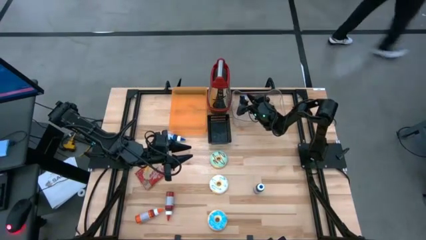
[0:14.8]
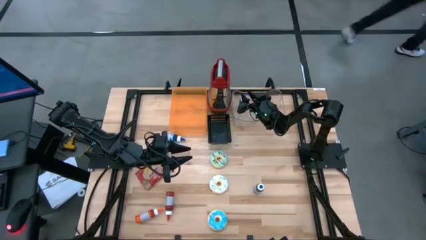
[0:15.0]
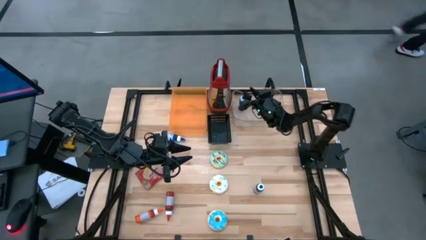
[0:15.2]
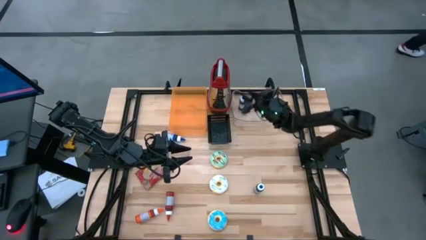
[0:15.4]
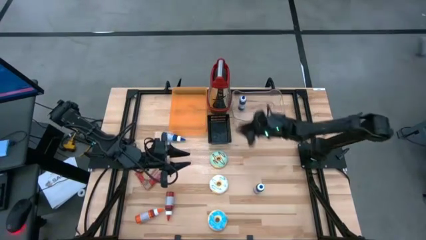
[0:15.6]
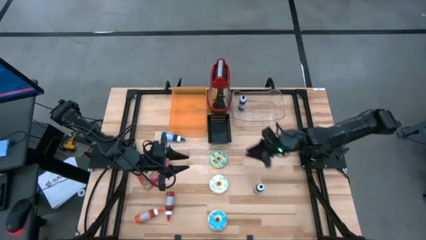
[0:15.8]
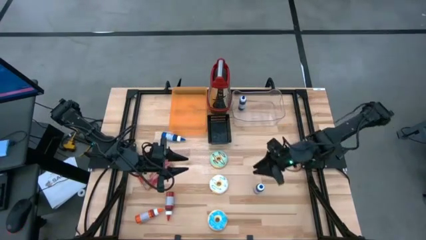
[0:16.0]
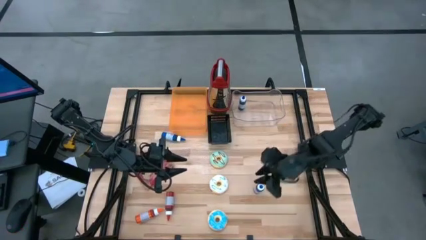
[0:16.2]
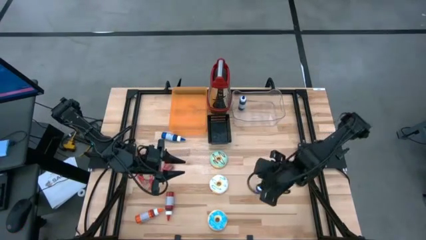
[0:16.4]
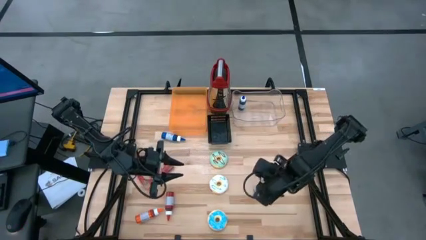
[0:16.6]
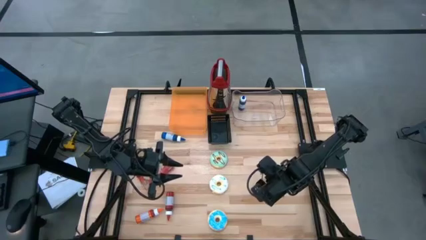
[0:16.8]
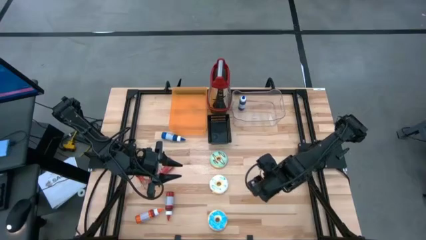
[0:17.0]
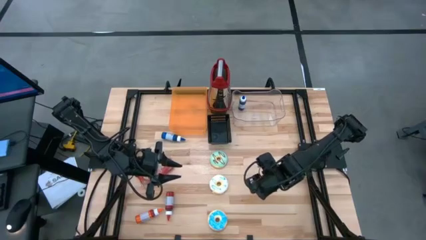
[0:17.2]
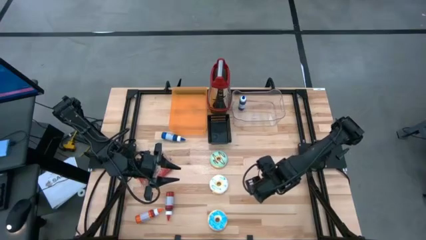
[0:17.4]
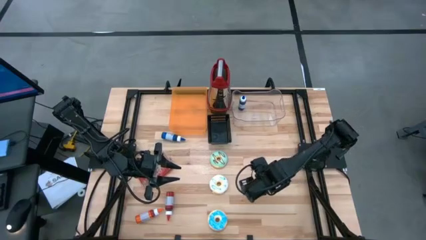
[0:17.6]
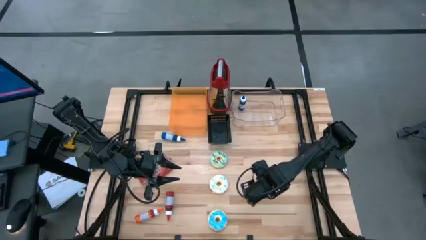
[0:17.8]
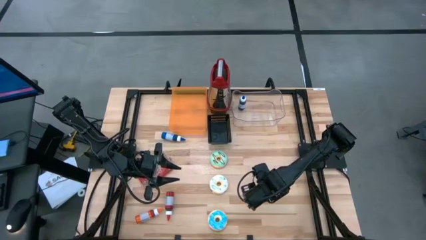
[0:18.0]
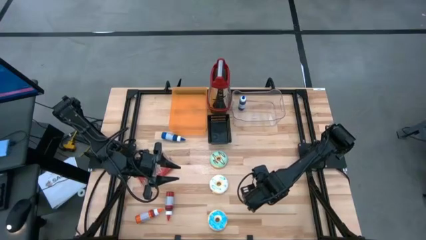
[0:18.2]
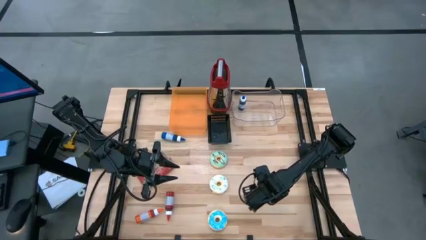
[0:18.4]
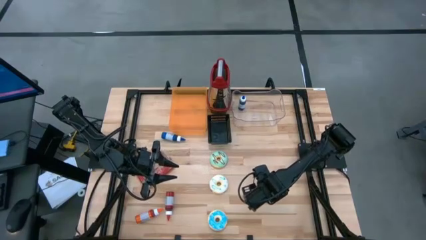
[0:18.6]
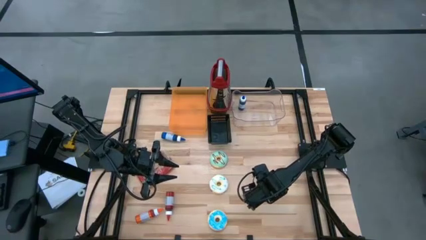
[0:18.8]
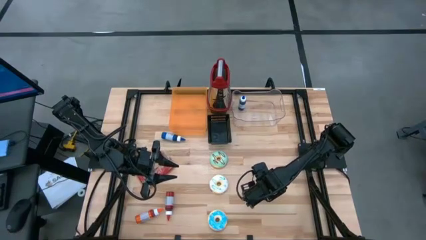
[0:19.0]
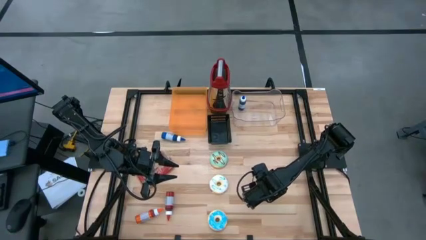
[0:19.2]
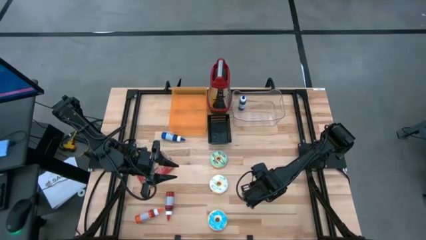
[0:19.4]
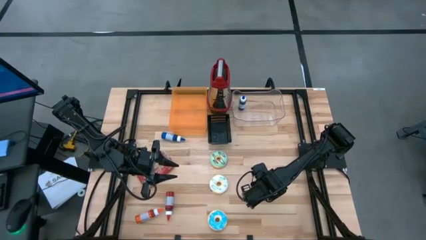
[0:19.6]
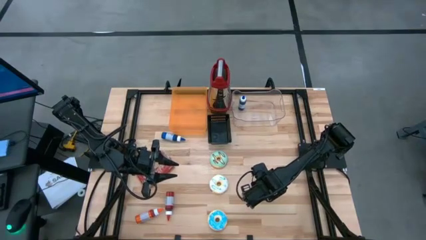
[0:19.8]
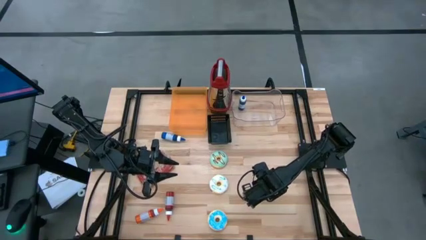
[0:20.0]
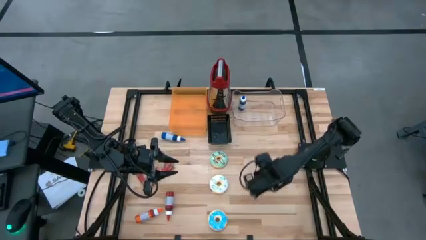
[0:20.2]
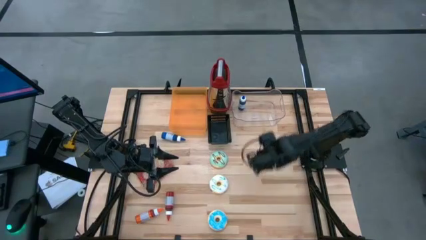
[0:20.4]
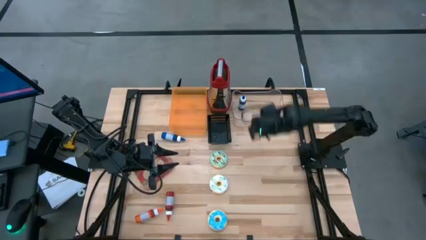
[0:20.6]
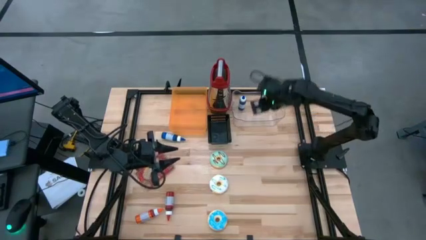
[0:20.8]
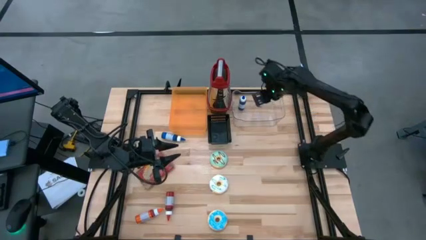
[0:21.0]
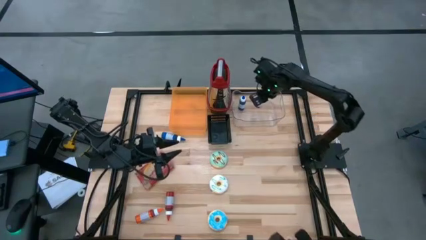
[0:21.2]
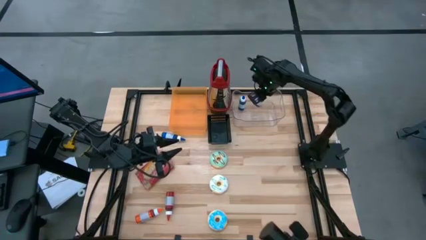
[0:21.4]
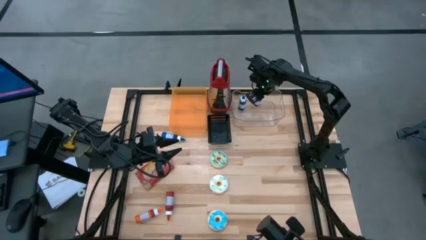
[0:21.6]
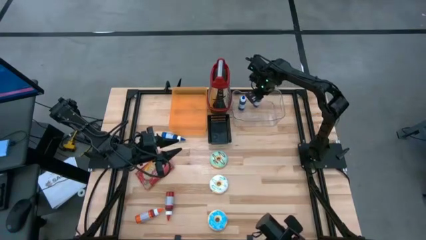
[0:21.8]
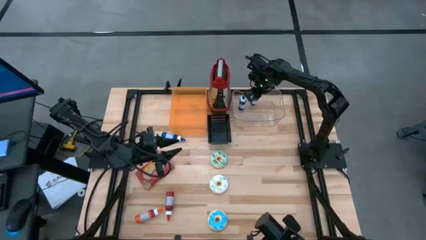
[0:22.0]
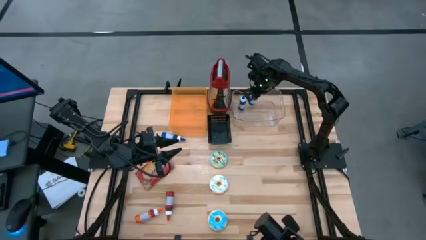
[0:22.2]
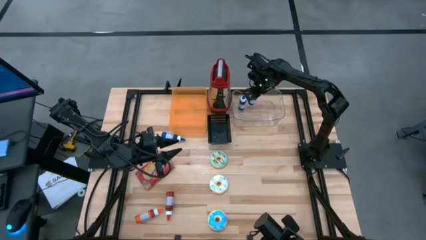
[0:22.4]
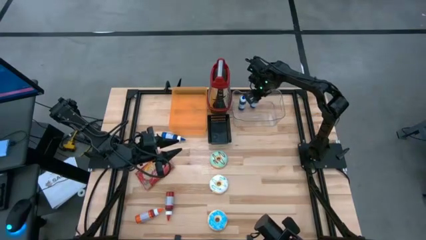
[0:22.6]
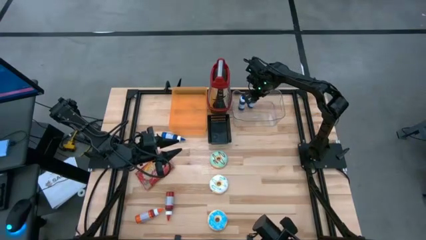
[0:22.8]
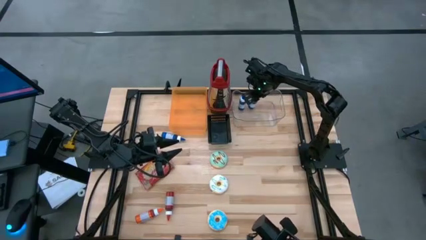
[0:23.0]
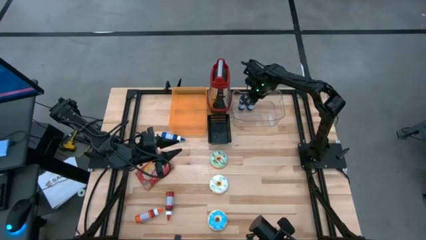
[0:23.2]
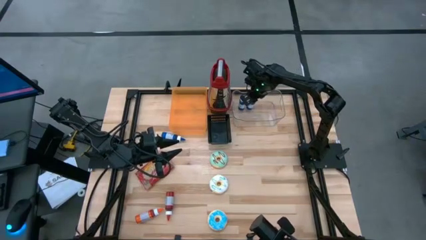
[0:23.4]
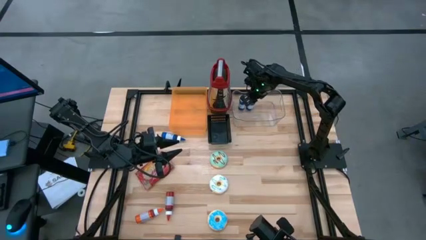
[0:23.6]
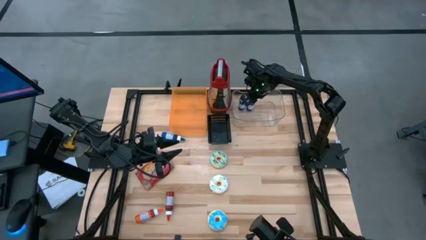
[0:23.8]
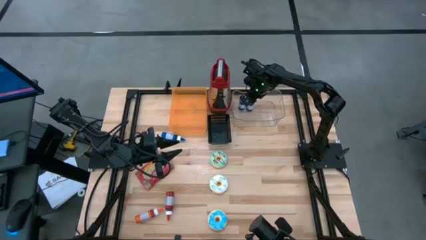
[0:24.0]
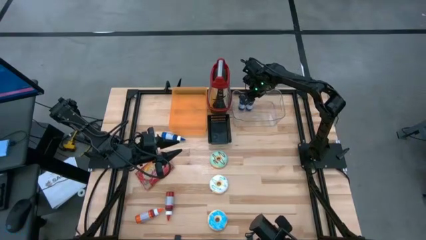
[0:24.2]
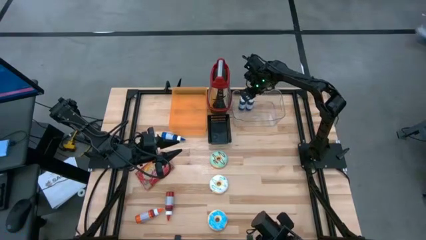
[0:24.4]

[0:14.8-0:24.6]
Put the right blue food coloring bottle into the transparent bin

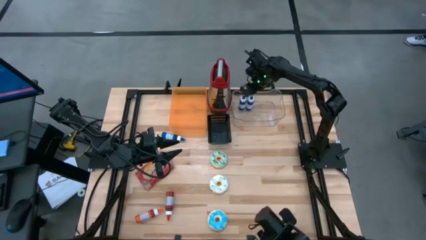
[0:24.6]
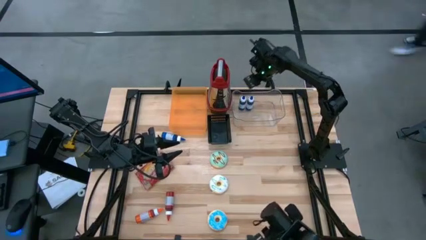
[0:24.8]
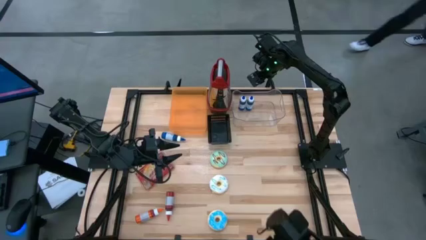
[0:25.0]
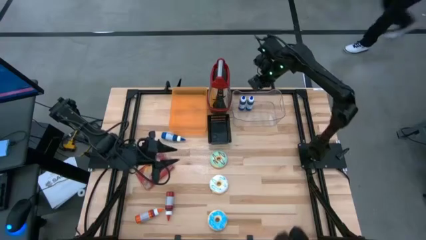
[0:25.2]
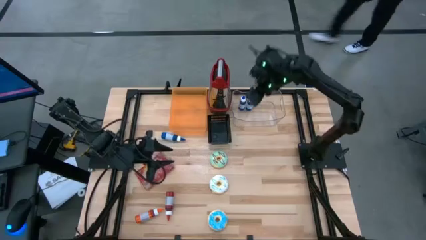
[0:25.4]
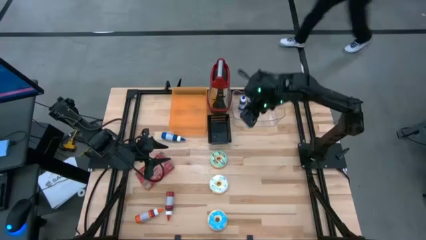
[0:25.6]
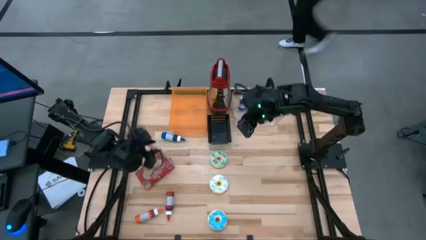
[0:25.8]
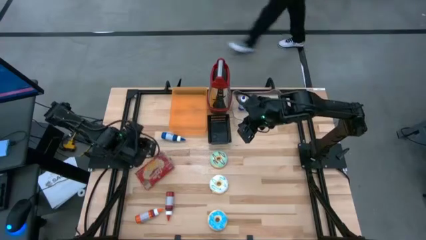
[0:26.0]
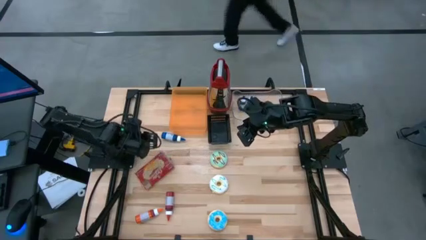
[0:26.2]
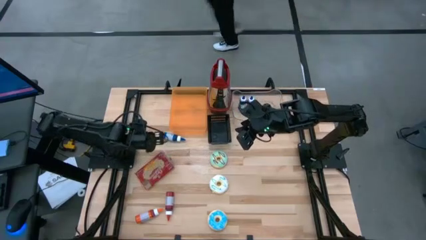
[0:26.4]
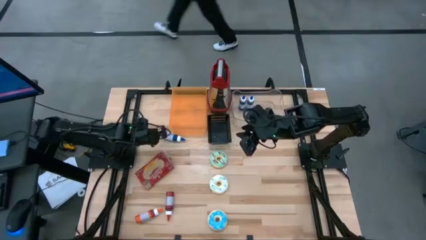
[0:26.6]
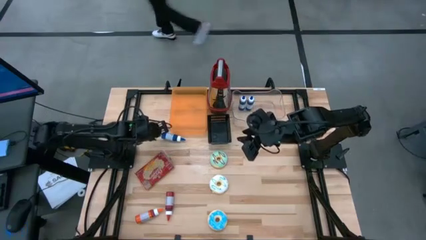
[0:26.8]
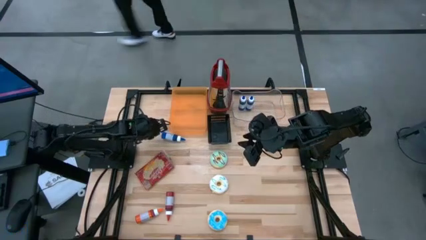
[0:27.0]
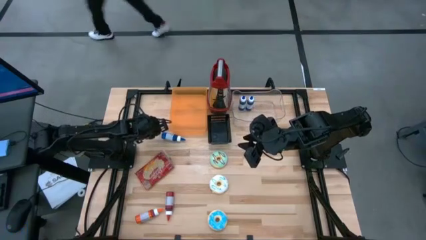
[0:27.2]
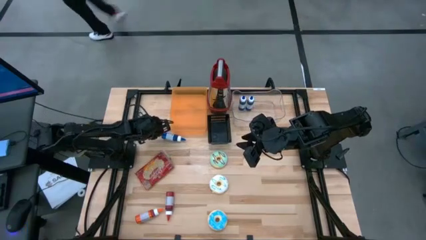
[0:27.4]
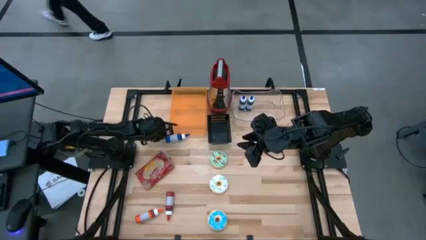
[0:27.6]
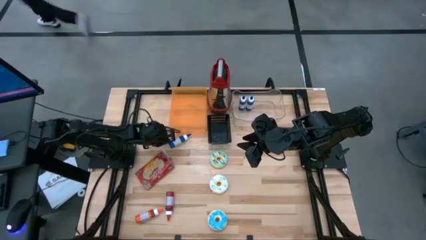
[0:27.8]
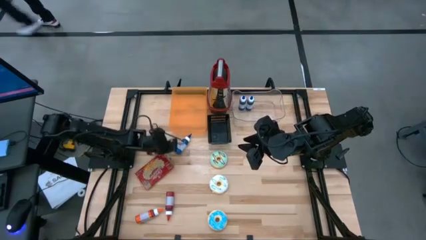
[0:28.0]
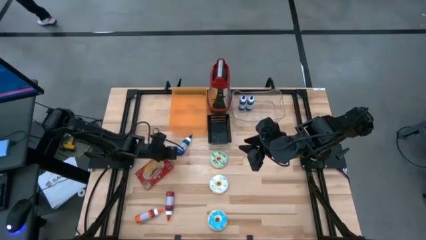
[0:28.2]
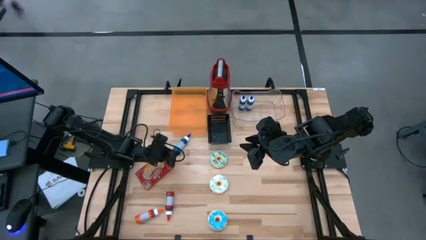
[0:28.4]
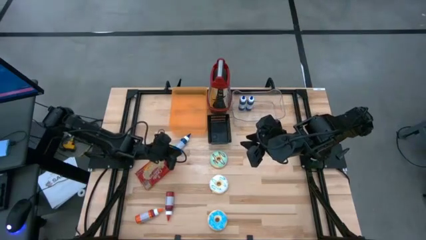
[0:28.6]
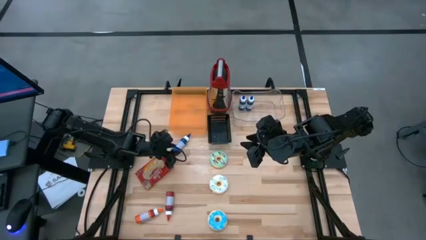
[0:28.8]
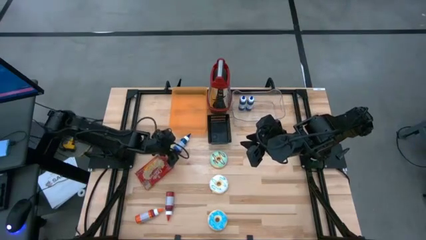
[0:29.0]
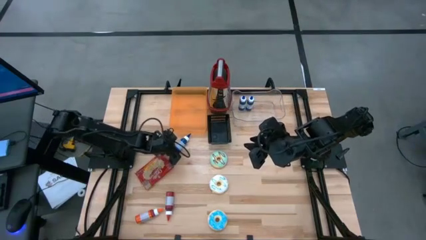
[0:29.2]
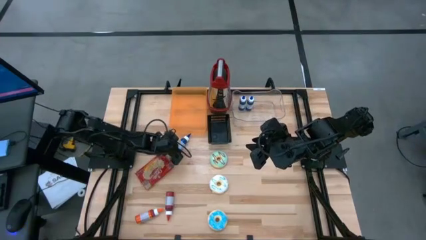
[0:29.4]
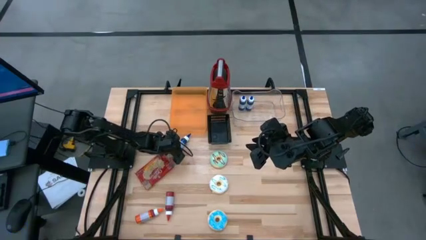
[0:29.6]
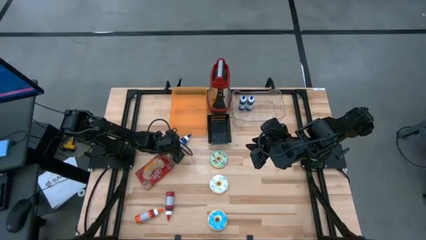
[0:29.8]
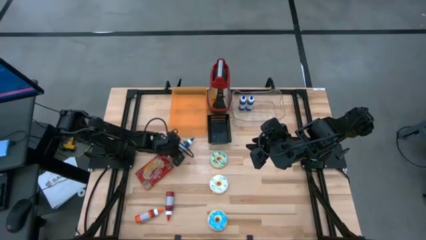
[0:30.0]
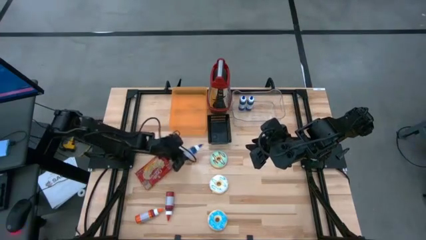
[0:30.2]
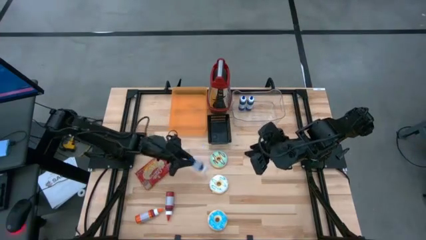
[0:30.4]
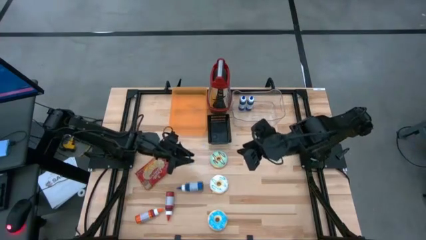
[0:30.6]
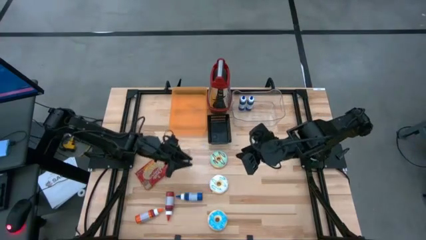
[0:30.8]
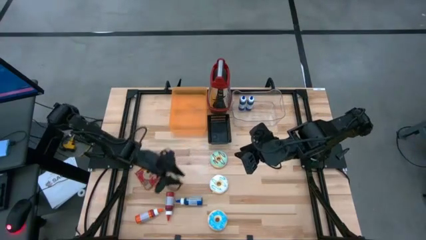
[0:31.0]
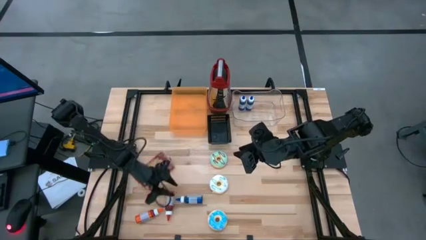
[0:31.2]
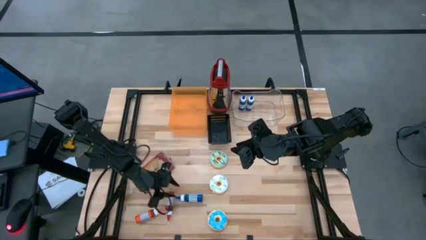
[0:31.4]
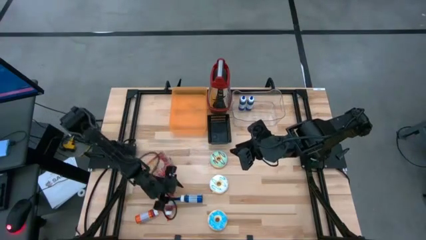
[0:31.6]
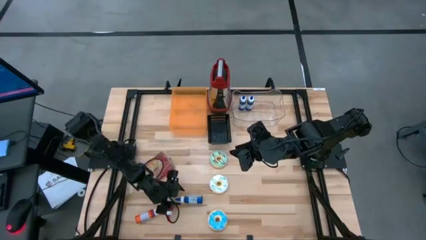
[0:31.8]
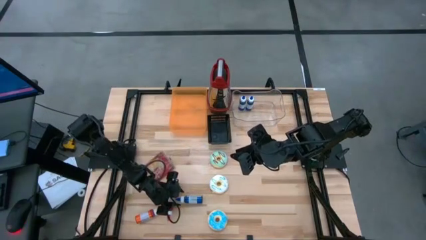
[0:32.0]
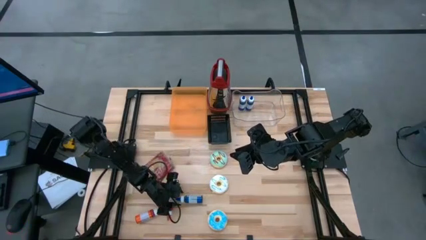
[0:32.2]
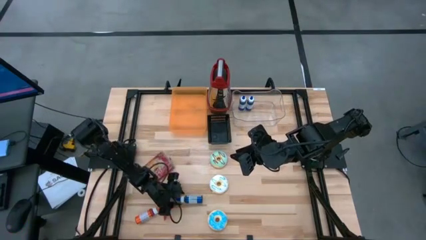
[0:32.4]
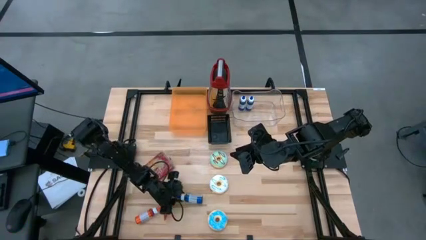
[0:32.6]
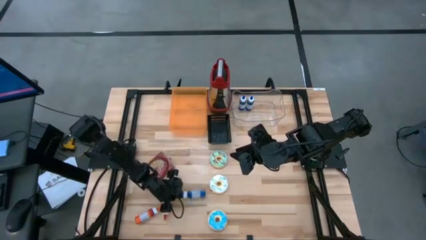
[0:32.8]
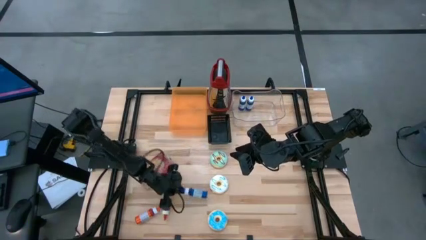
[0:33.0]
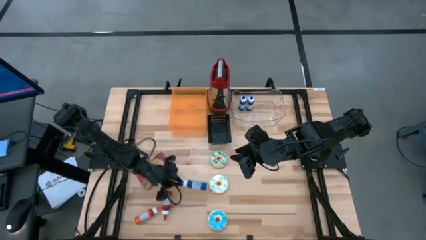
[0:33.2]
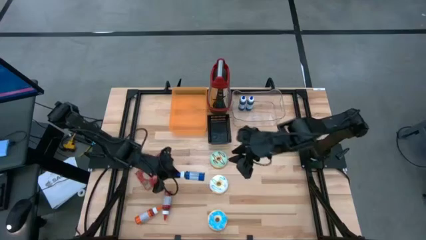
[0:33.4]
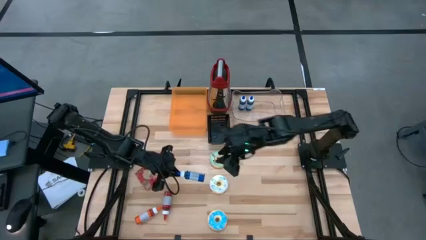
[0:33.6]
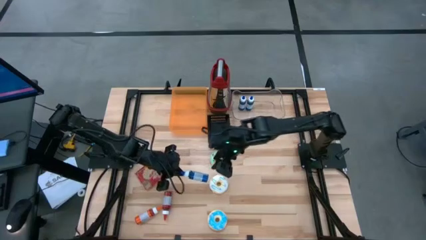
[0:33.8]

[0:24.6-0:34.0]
Put the blue food coloring bottle into the transparent bin
